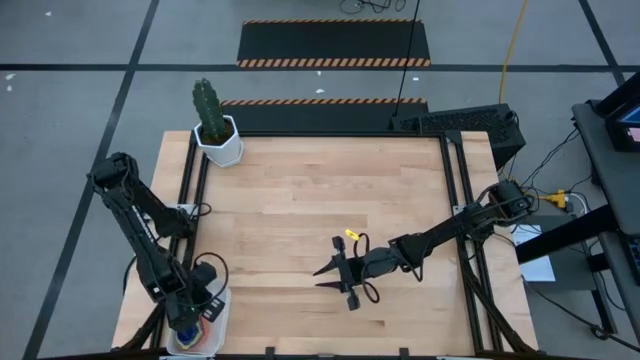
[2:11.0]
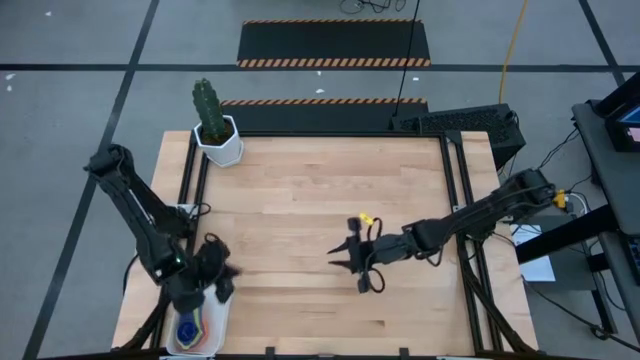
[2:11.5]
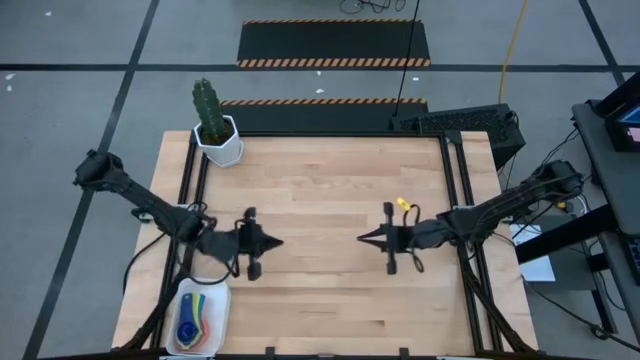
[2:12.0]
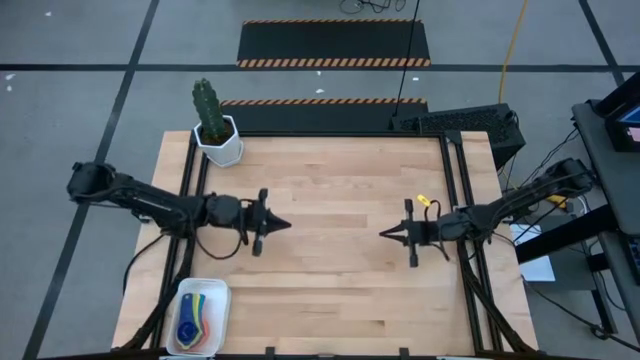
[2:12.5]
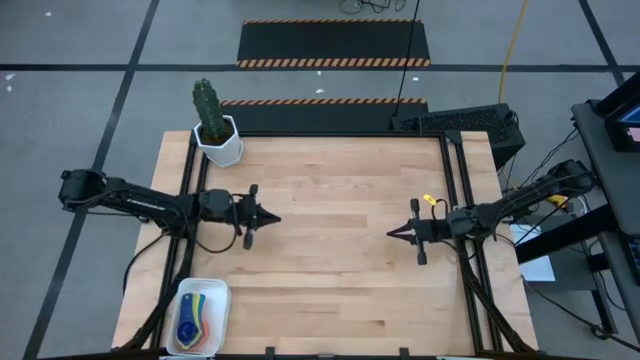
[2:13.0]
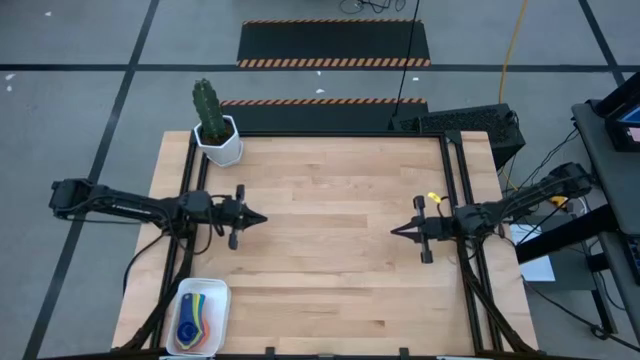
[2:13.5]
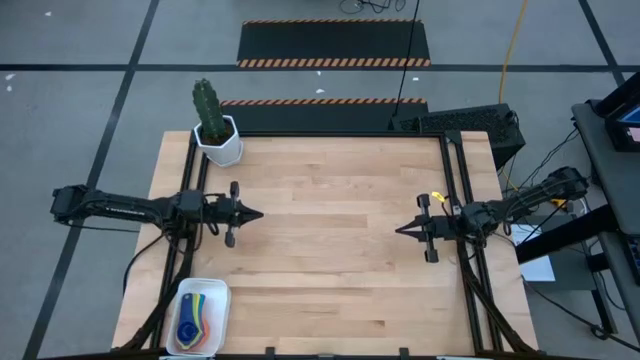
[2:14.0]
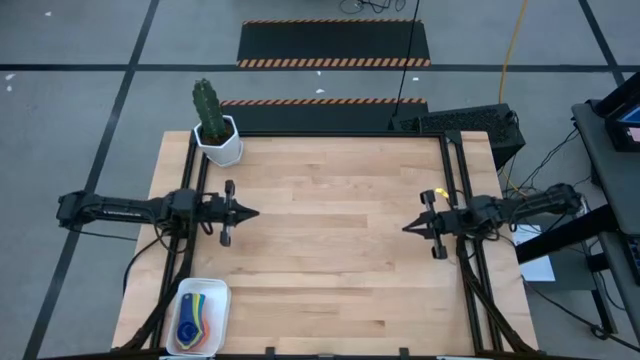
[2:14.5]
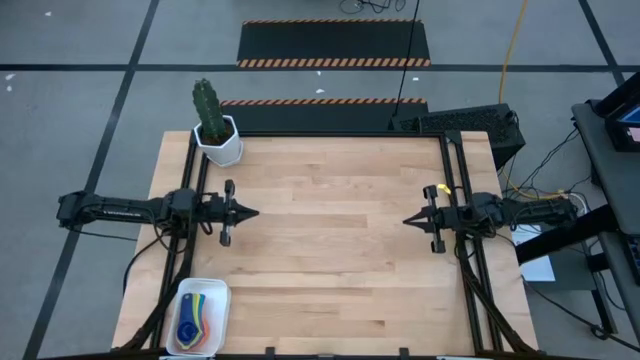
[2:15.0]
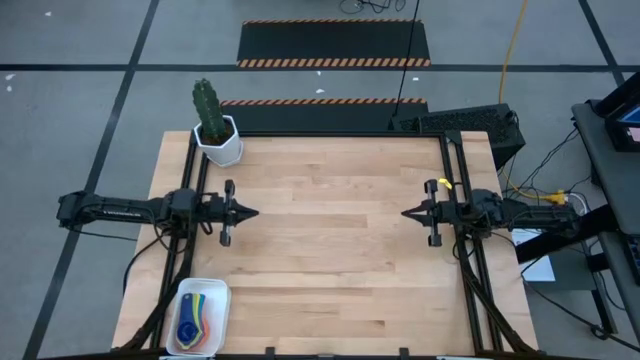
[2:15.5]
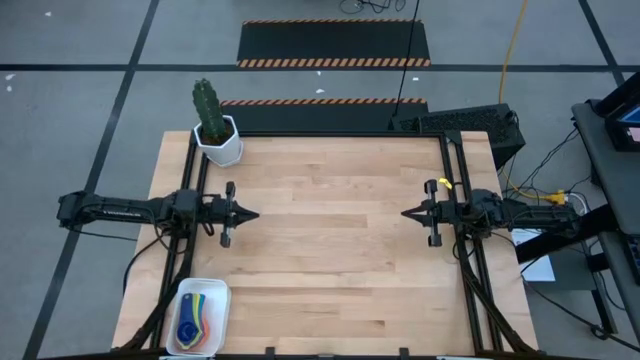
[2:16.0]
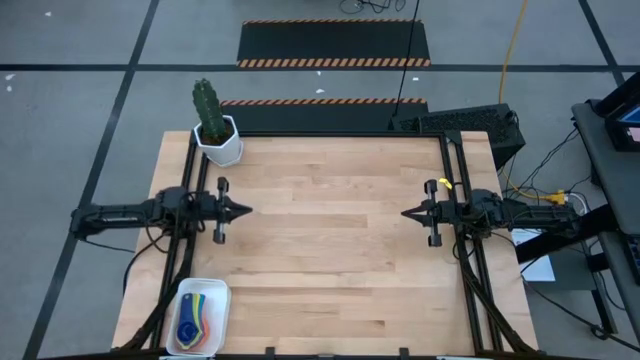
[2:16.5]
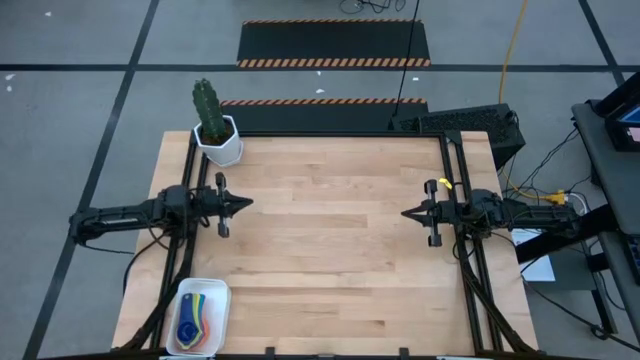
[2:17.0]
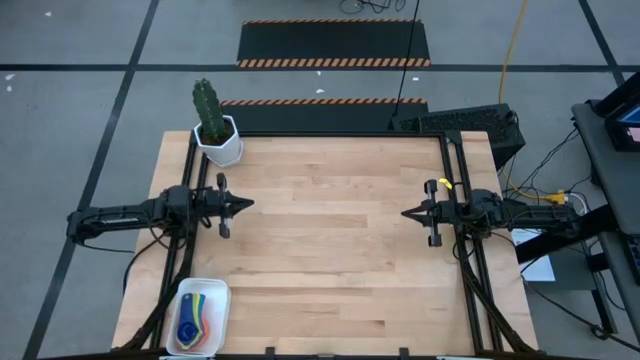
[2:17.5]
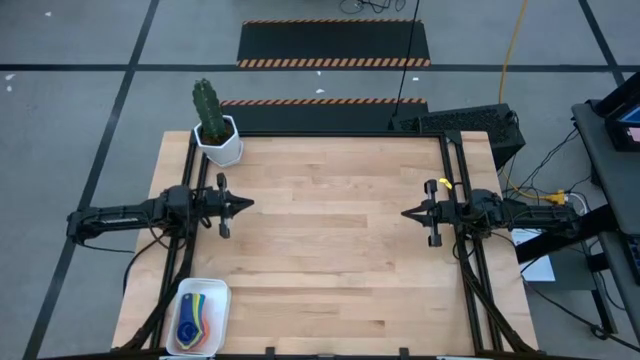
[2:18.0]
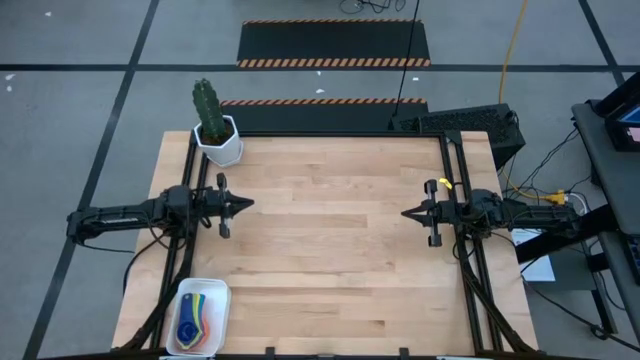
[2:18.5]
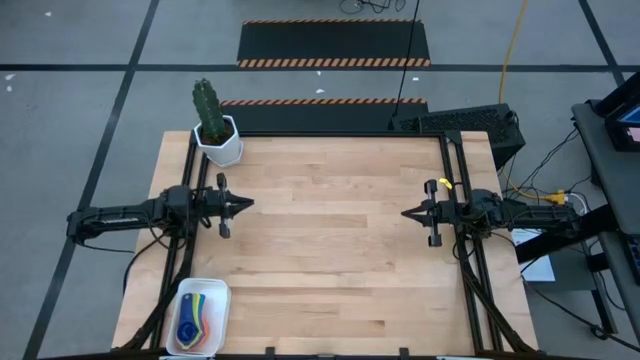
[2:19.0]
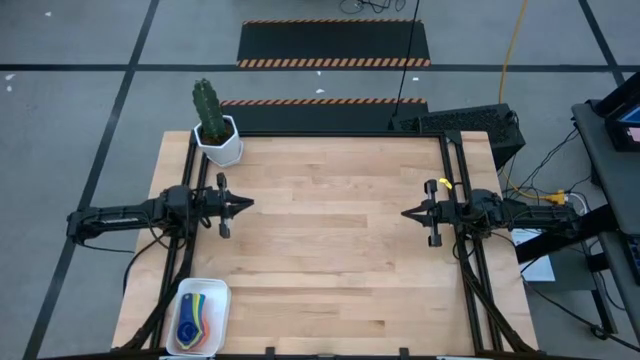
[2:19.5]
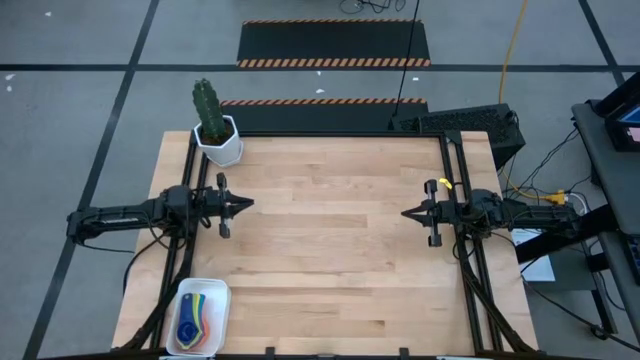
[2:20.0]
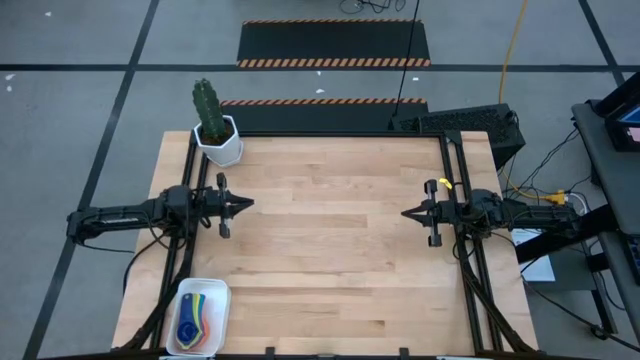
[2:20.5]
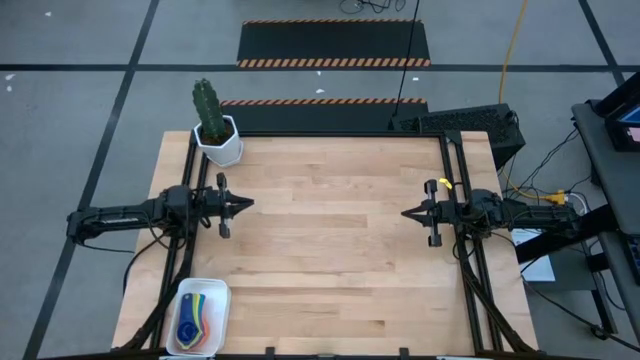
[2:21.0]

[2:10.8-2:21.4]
Task: Nest measuring cups in basket
Return to Home Position

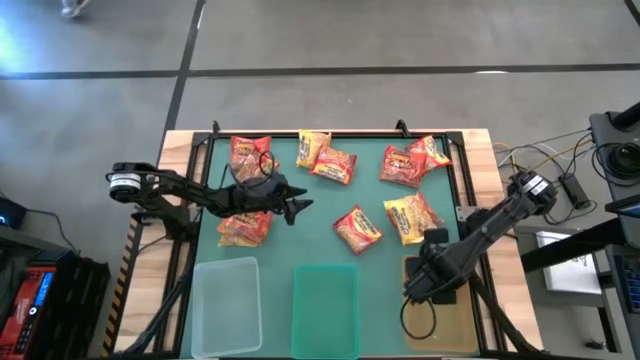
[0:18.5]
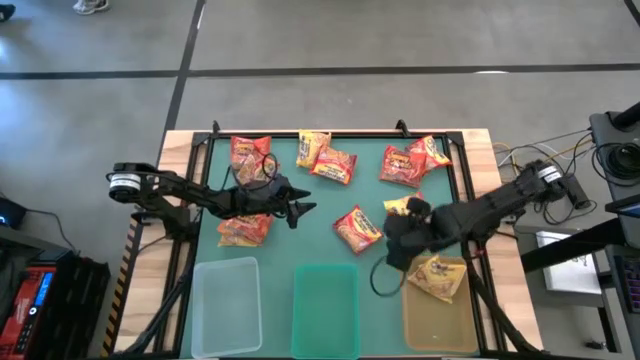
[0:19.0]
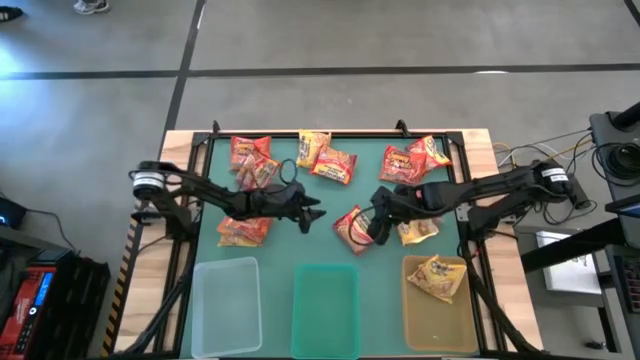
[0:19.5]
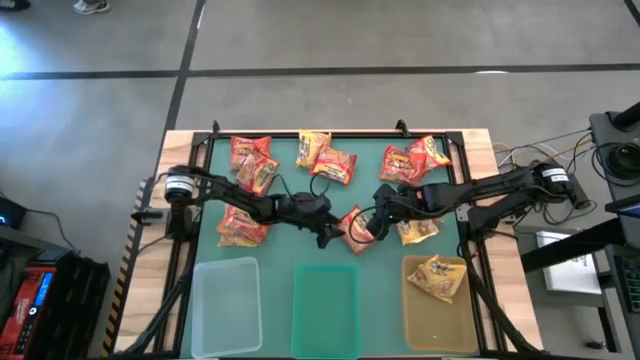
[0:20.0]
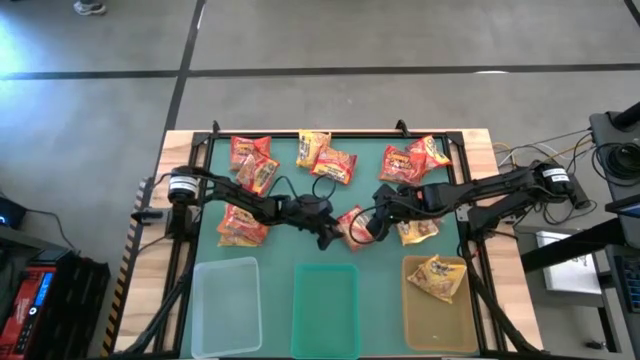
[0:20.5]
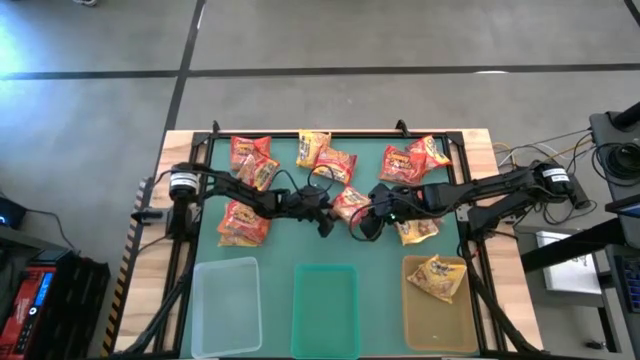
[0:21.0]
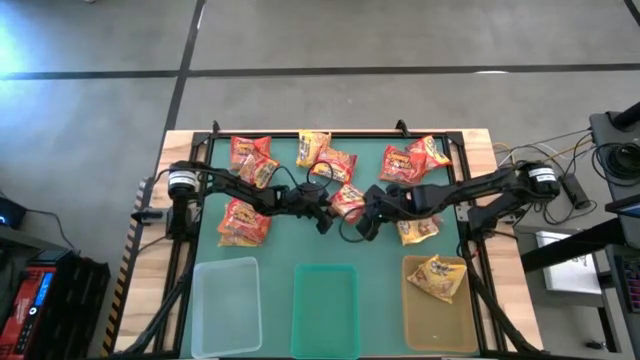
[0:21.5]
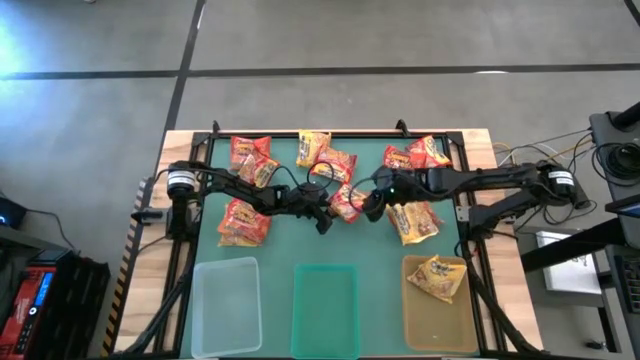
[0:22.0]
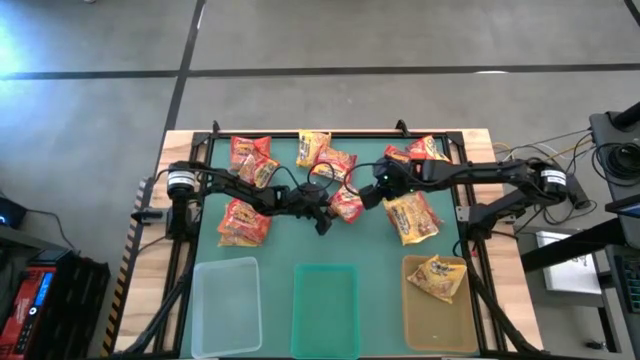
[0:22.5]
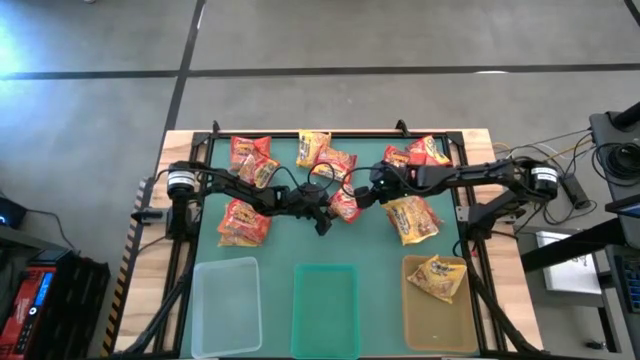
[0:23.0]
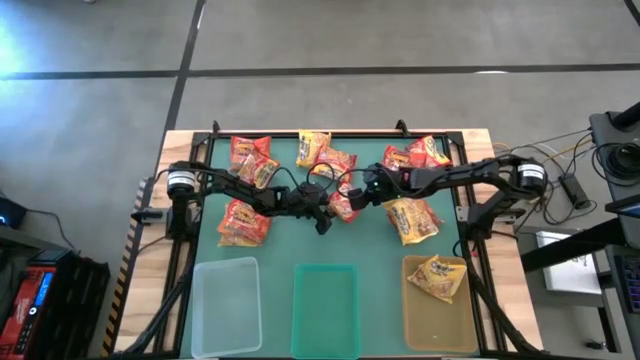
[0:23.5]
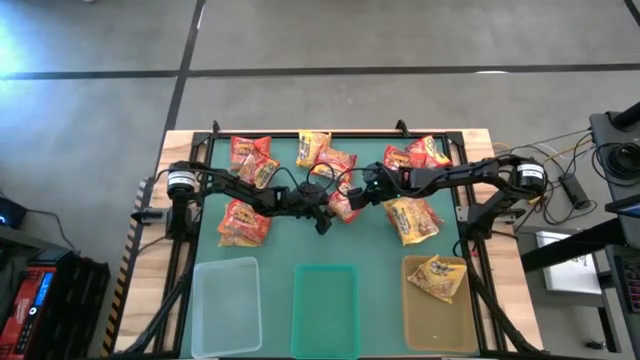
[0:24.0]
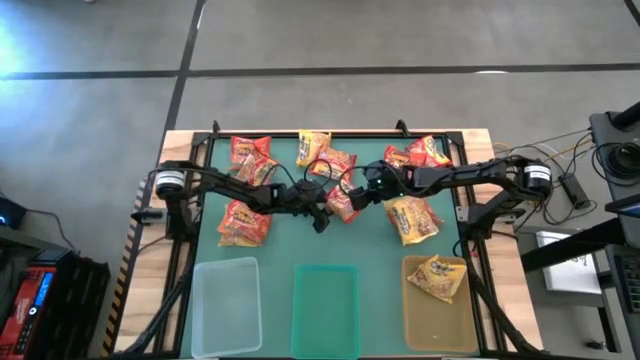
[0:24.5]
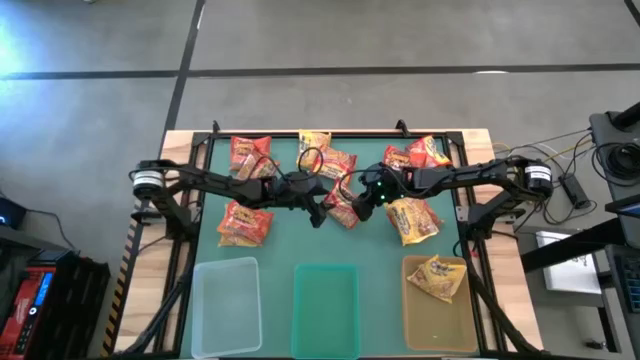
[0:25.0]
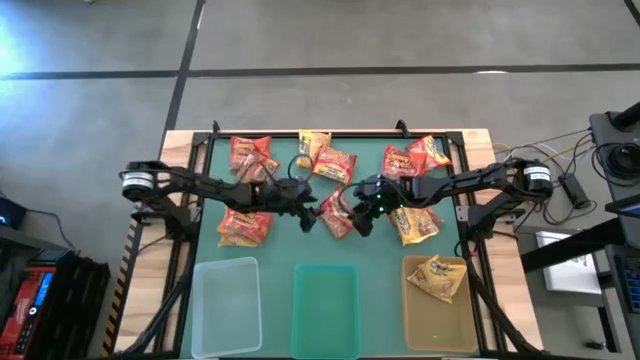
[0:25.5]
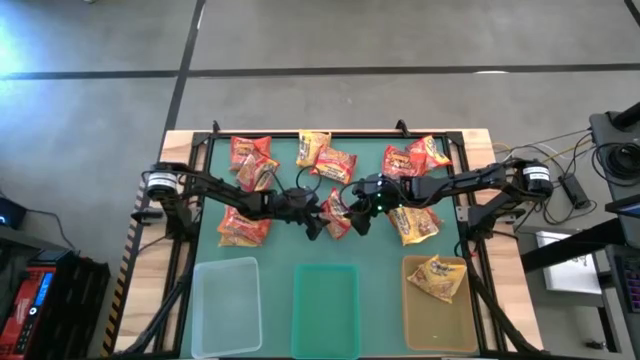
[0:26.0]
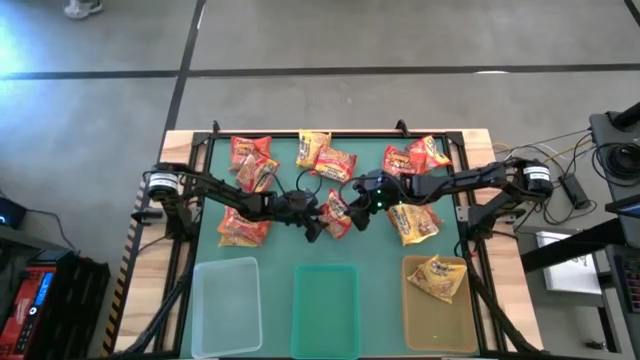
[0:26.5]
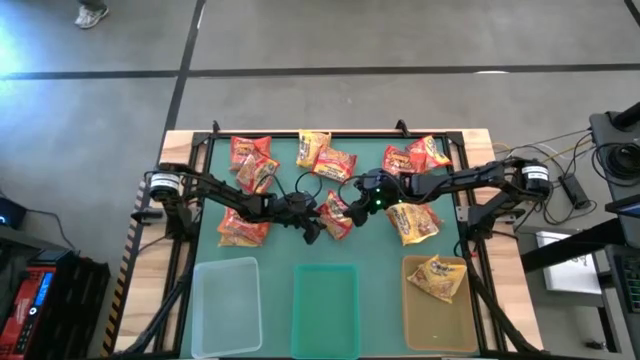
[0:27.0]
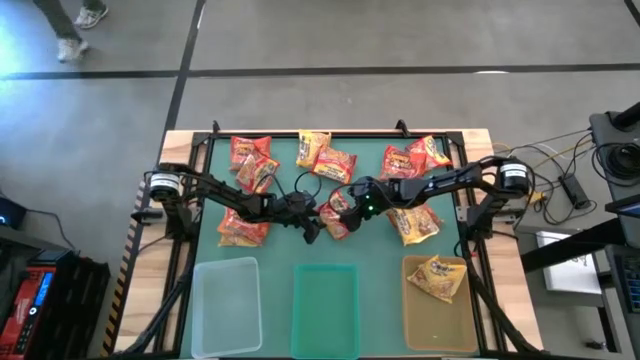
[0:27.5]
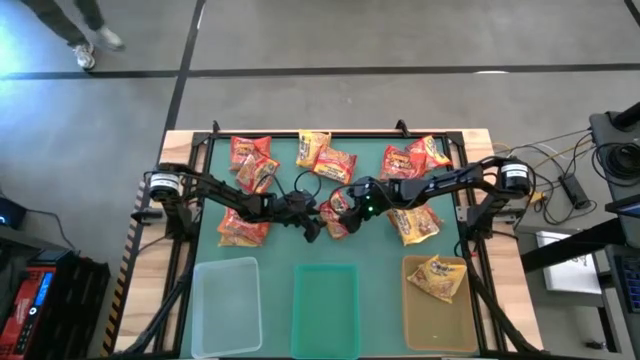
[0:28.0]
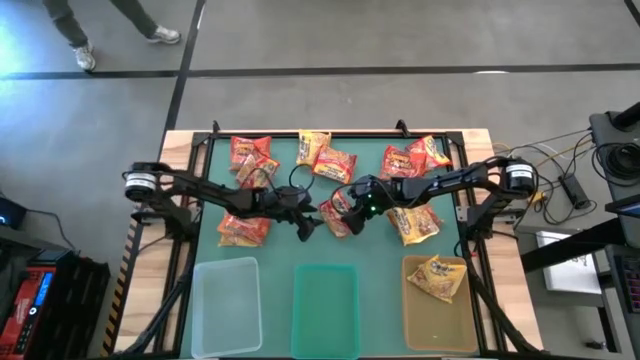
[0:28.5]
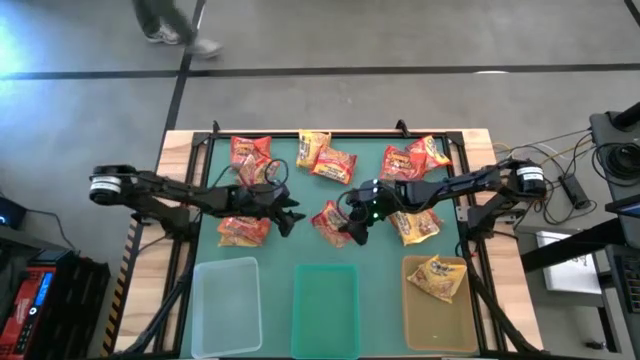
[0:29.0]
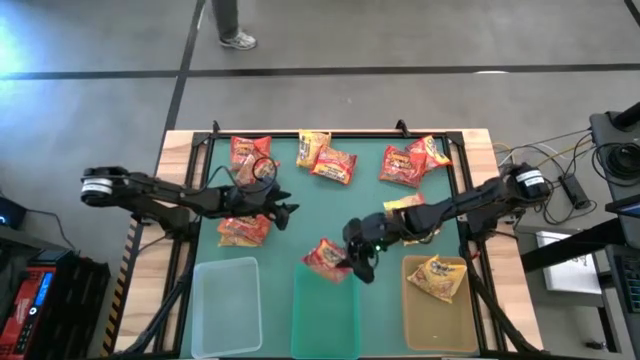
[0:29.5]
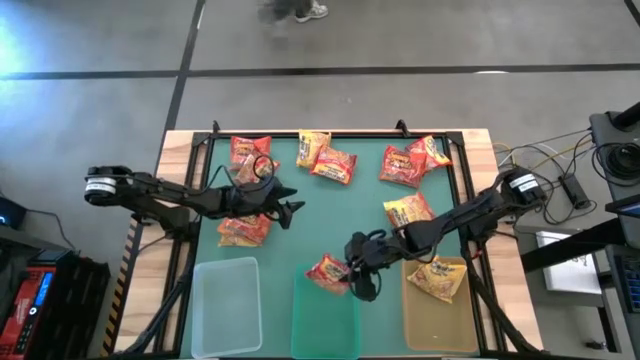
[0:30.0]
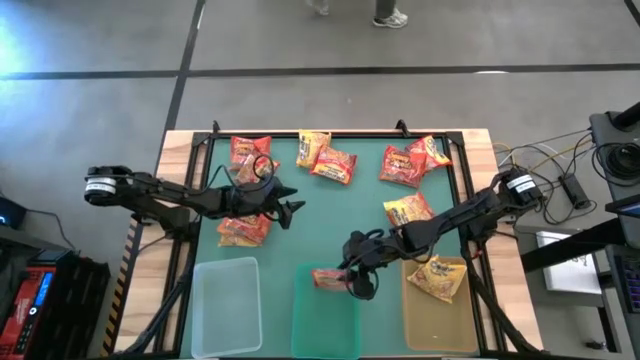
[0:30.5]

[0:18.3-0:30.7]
Task: Sort Maruchan noodles
Put the red noodle pack into the green bin
